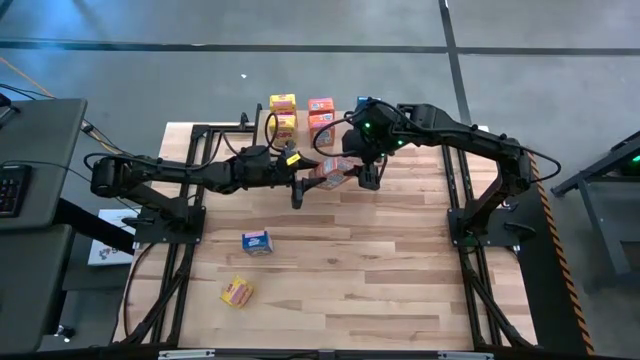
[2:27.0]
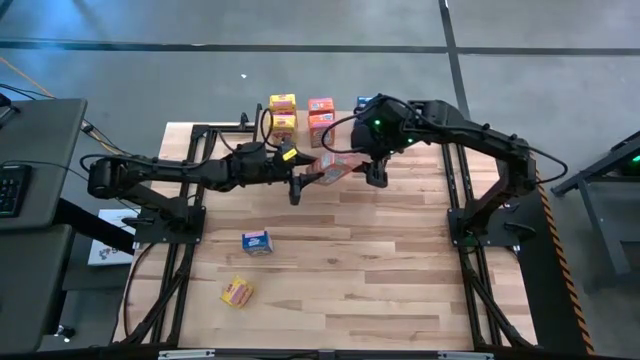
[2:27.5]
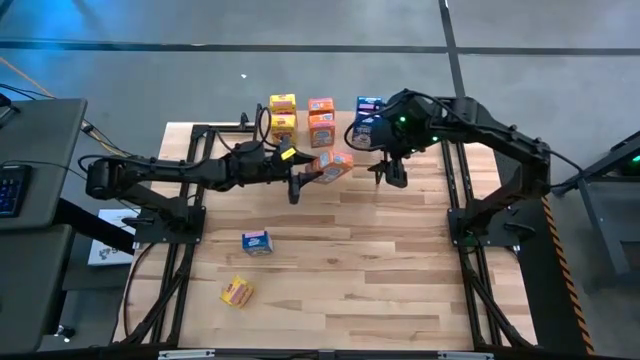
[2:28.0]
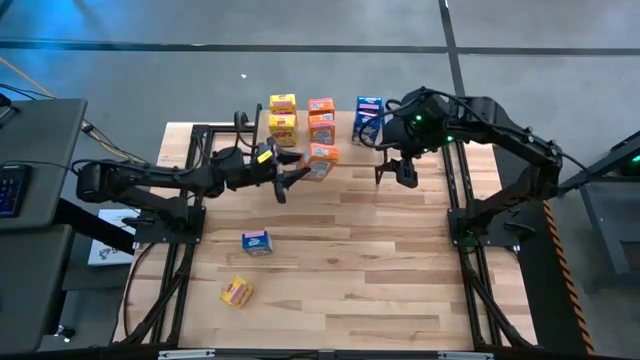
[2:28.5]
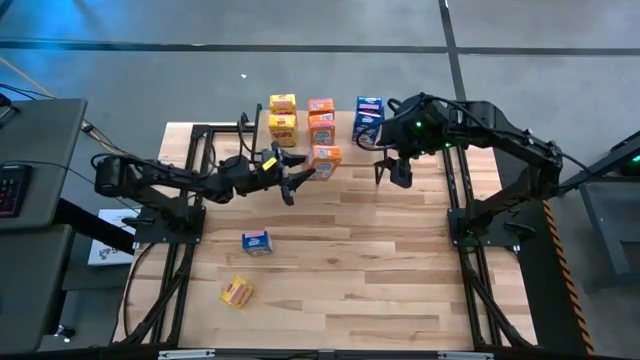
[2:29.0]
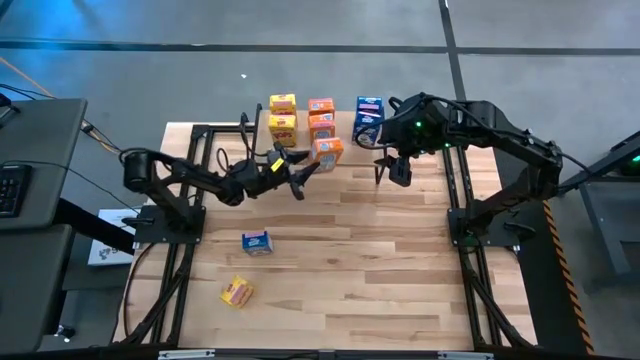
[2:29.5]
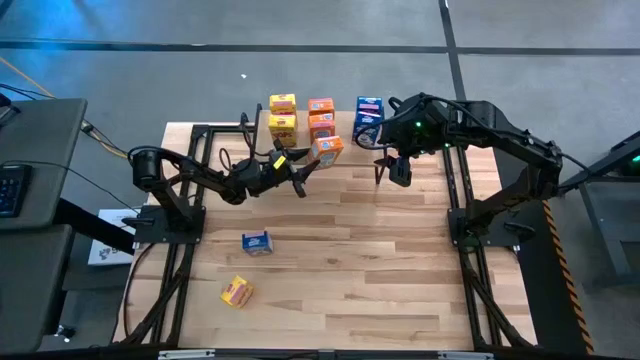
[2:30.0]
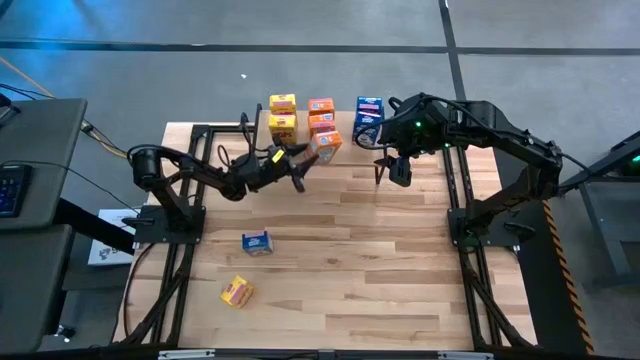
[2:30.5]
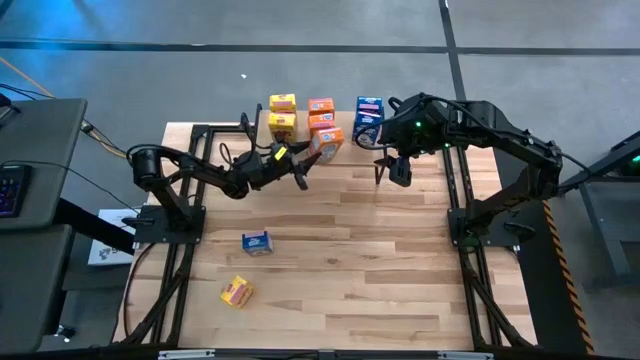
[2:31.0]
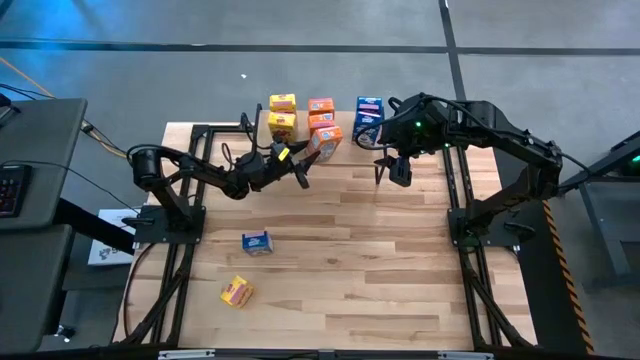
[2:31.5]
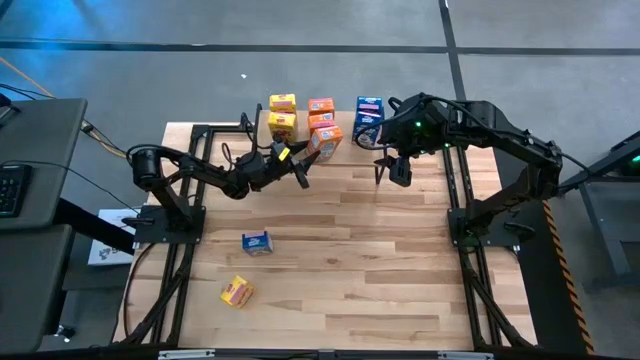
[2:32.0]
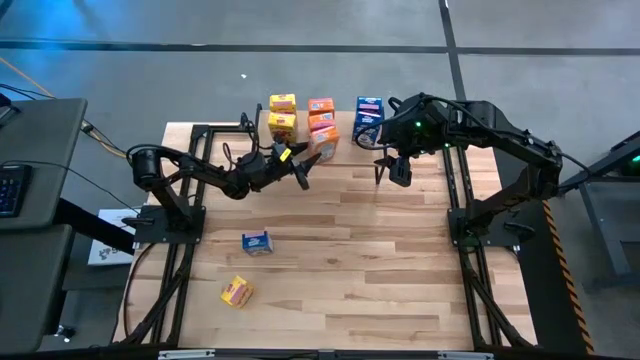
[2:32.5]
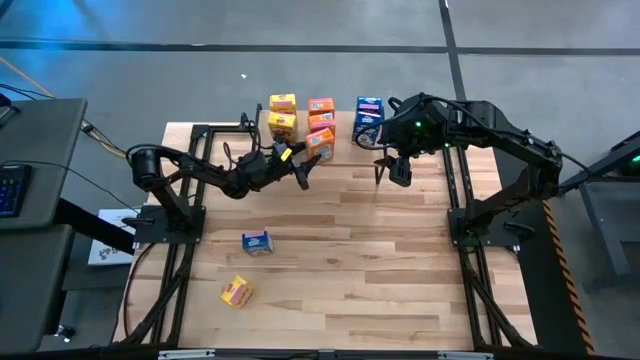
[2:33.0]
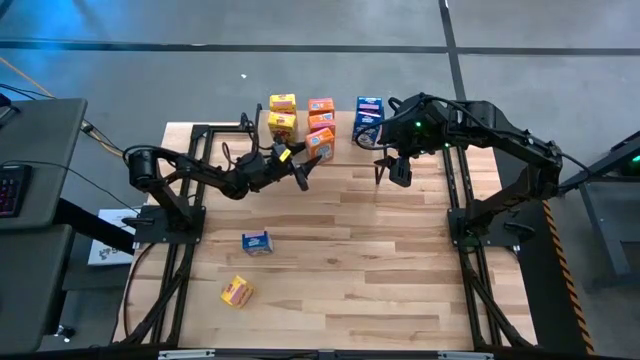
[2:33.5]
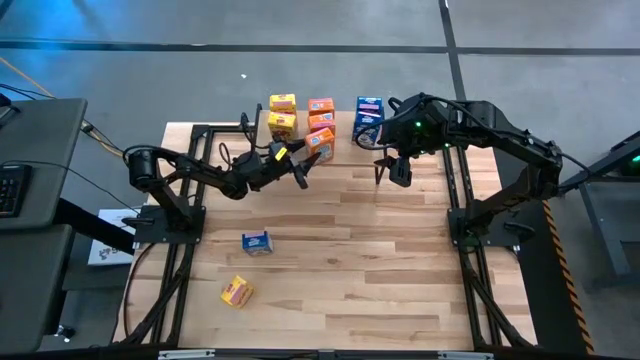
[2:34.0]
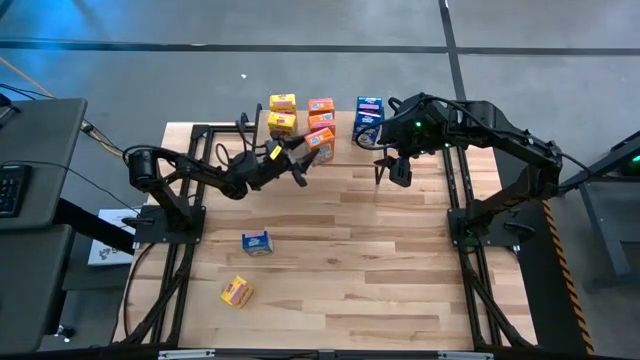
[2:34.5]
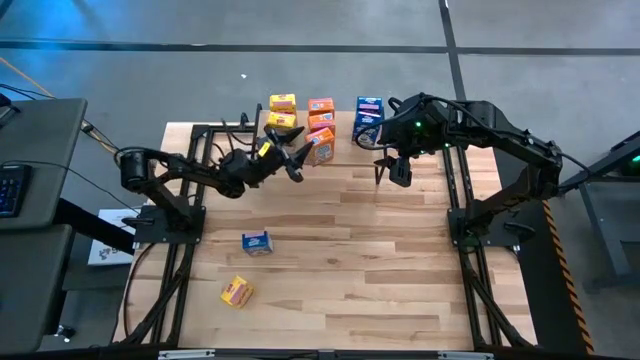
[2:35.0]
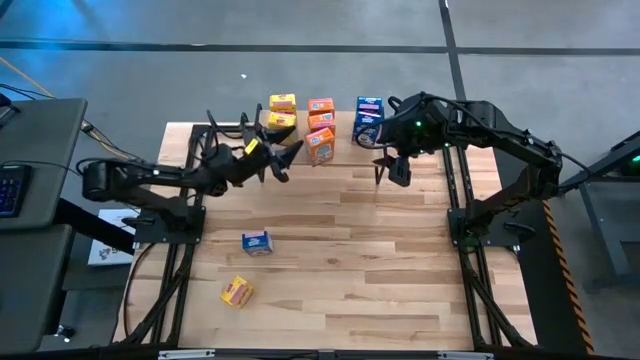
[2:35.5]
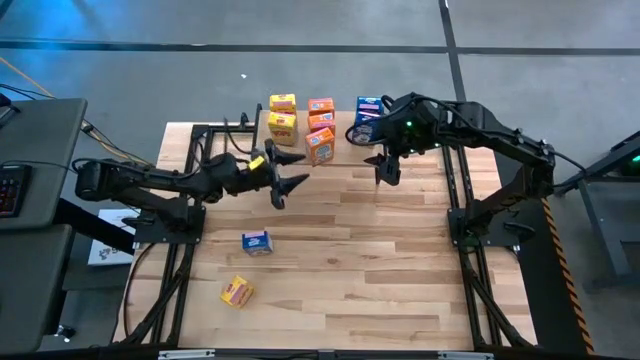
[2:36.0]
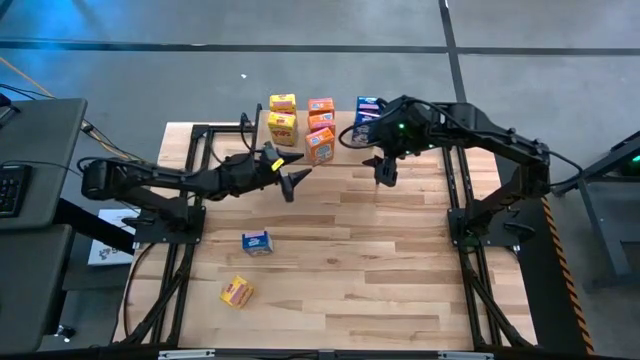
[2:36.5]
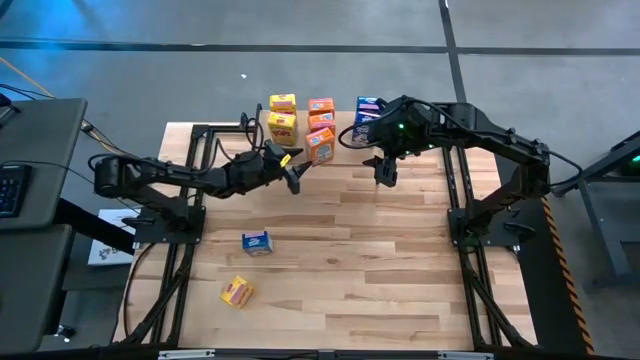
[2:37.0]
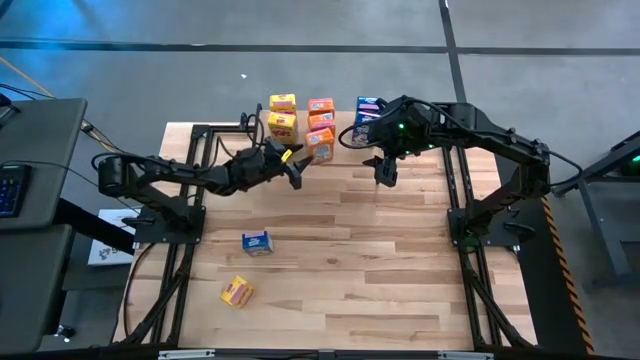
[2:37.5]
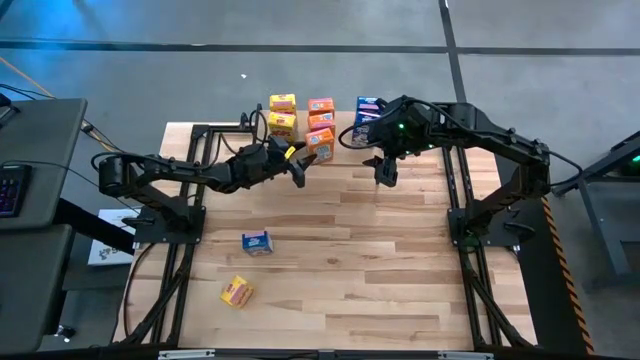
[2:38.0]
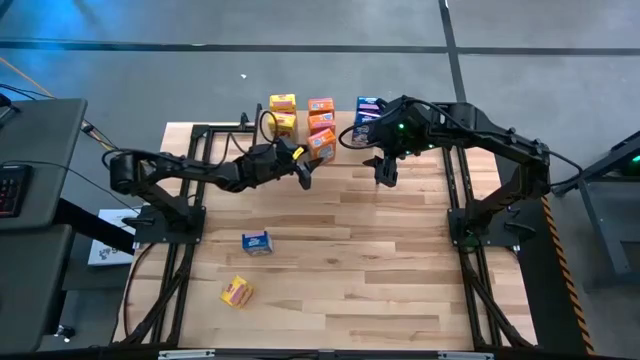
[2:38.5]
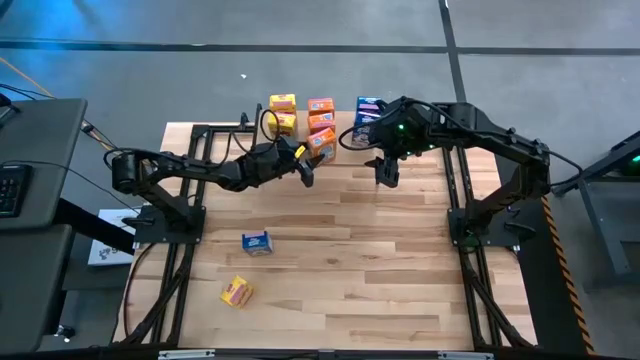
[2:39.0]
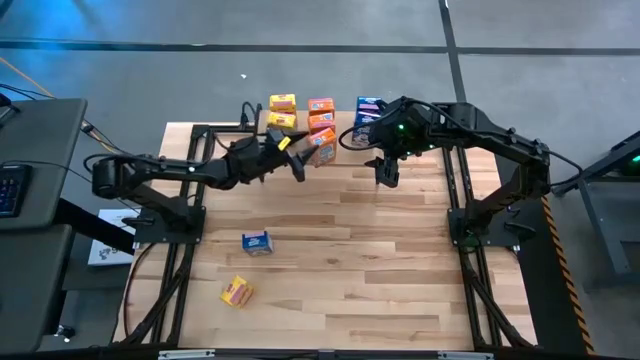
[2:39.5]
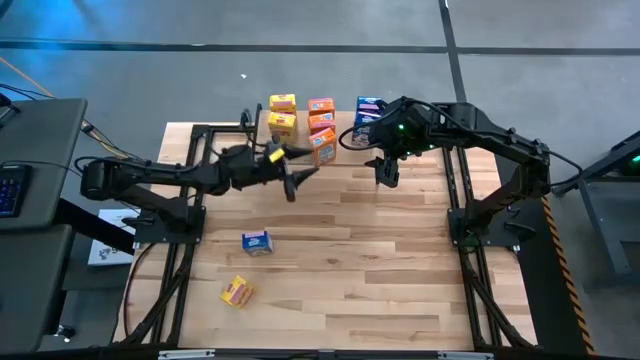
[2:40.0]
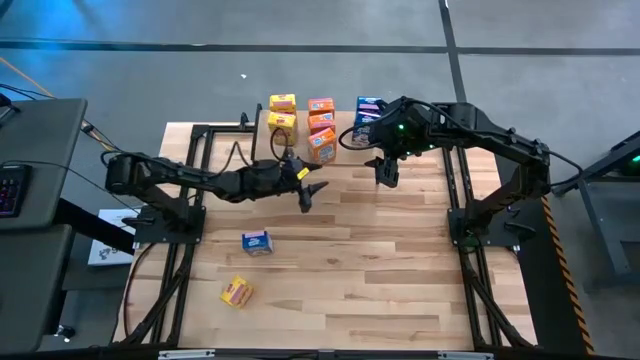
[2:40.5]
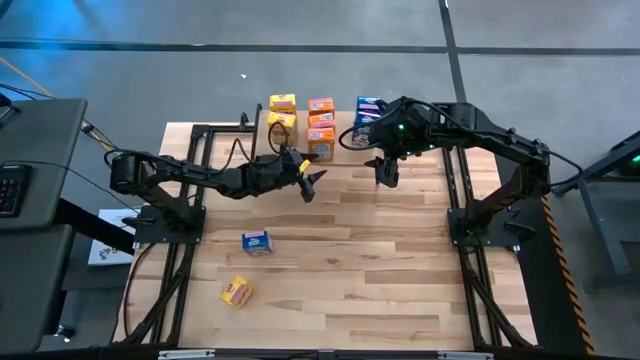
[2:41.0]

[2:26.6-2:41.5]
Task: Stack cereal on shelf
Put the orange cereal box on the shelf aligned with the other orange cereal boxes
